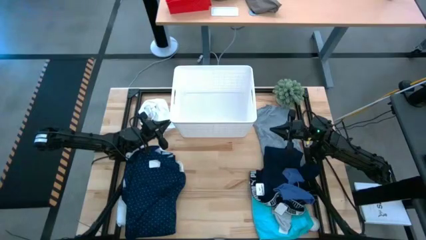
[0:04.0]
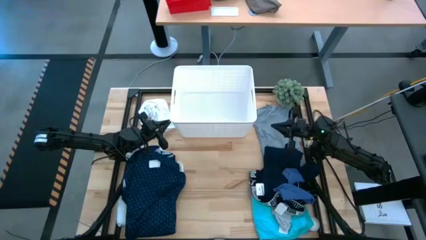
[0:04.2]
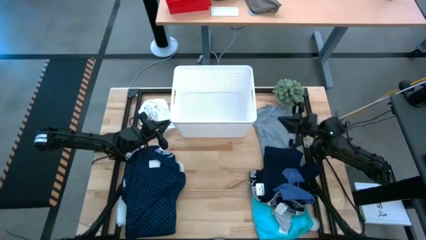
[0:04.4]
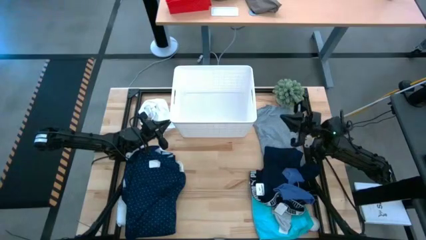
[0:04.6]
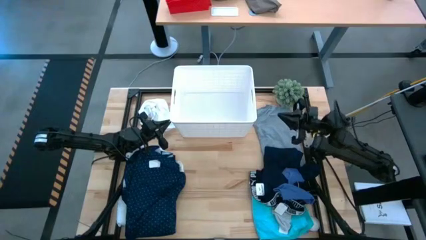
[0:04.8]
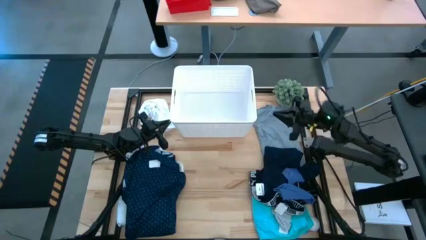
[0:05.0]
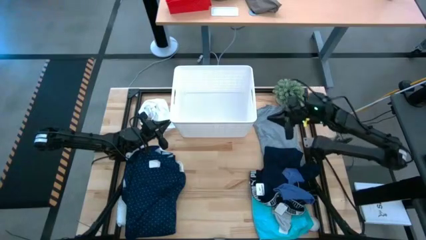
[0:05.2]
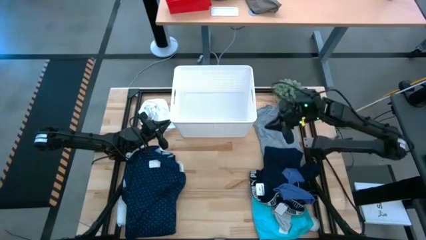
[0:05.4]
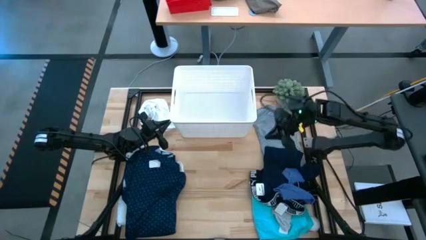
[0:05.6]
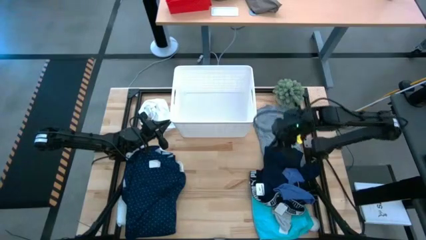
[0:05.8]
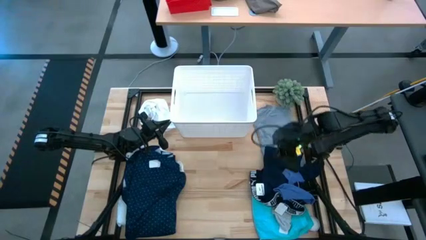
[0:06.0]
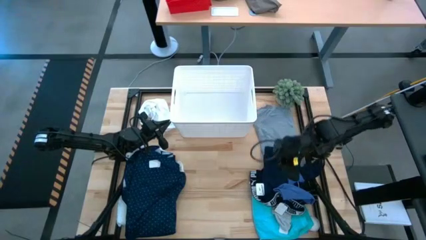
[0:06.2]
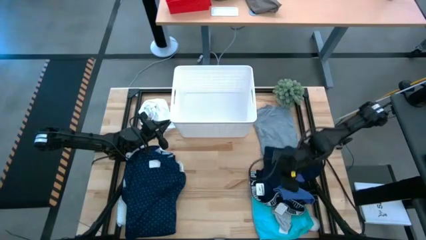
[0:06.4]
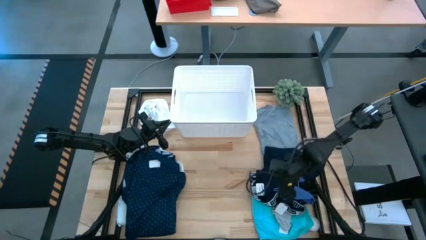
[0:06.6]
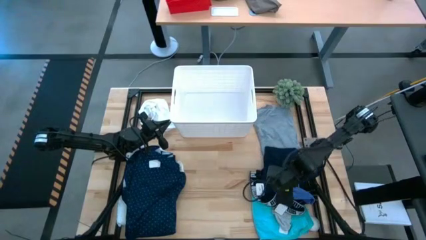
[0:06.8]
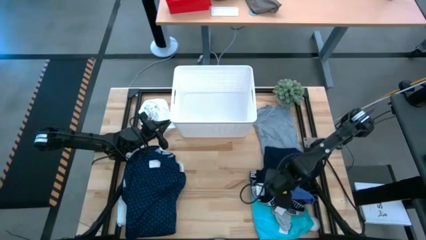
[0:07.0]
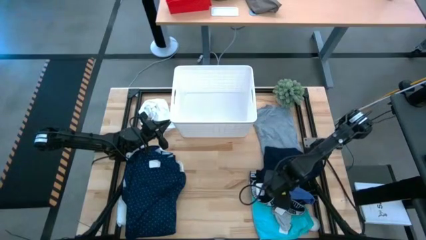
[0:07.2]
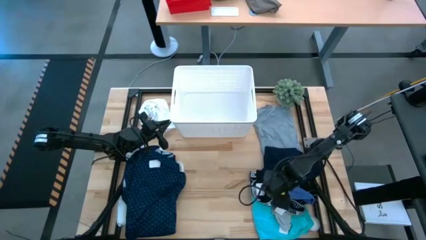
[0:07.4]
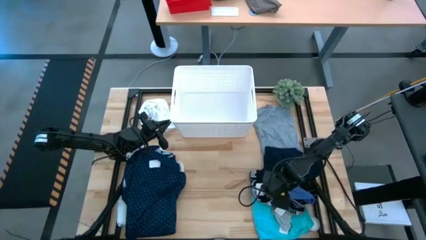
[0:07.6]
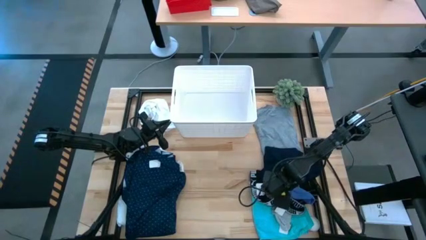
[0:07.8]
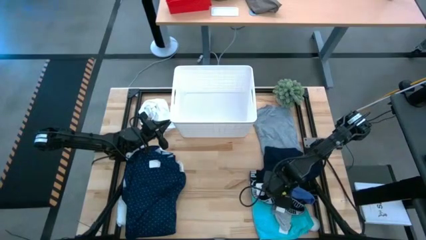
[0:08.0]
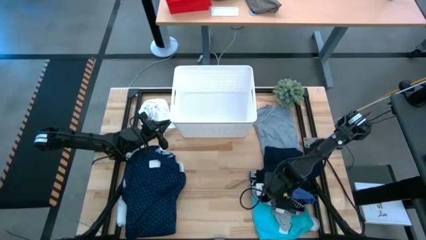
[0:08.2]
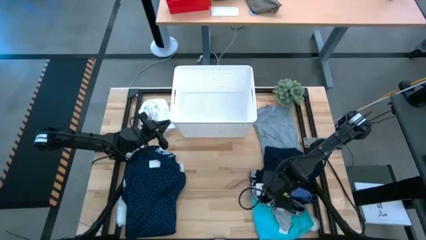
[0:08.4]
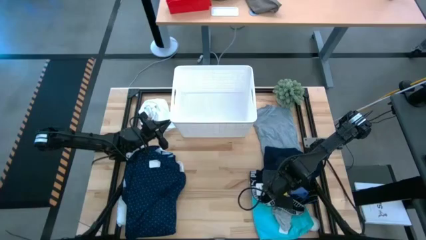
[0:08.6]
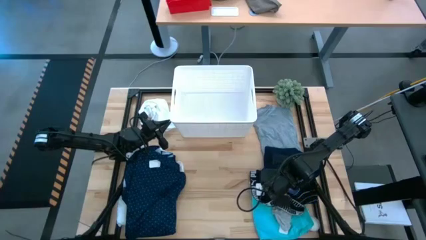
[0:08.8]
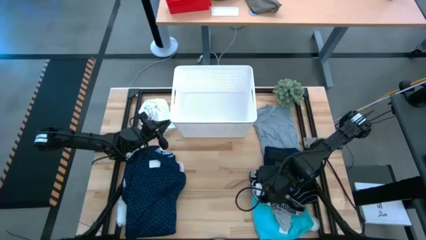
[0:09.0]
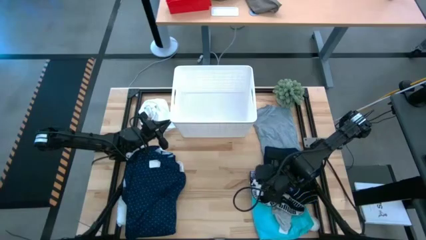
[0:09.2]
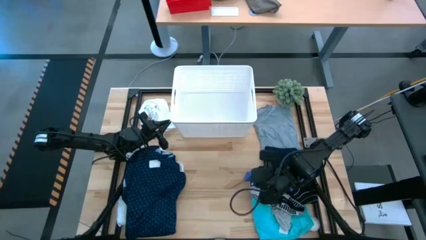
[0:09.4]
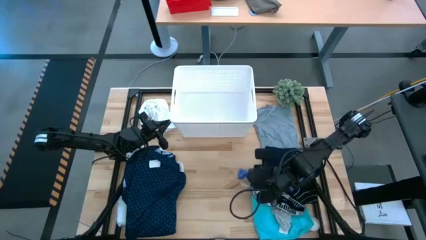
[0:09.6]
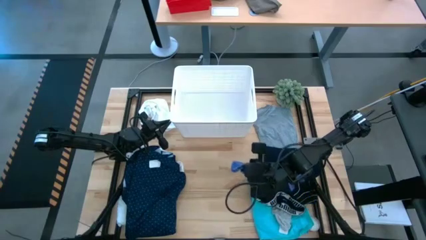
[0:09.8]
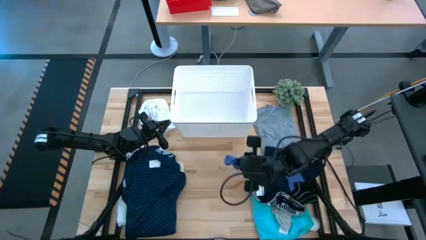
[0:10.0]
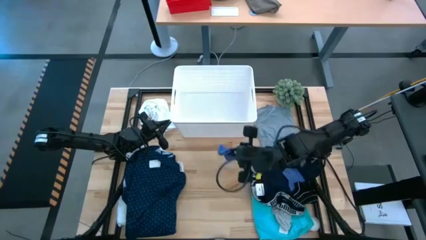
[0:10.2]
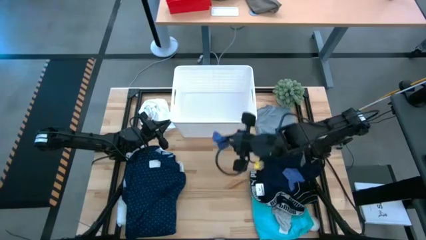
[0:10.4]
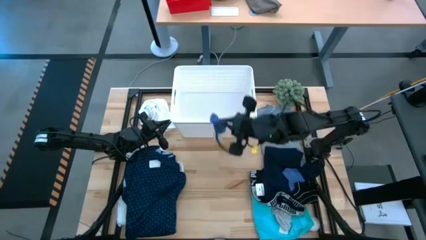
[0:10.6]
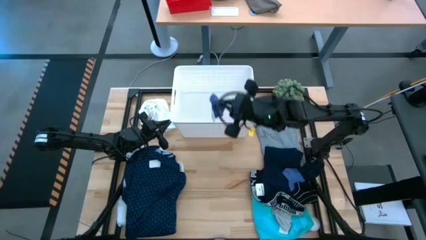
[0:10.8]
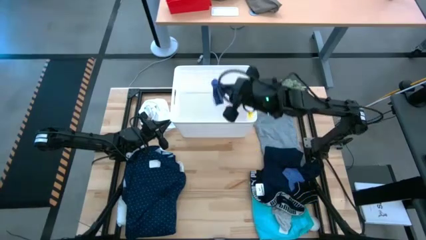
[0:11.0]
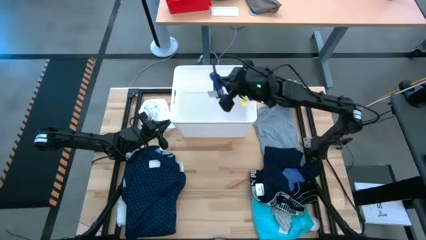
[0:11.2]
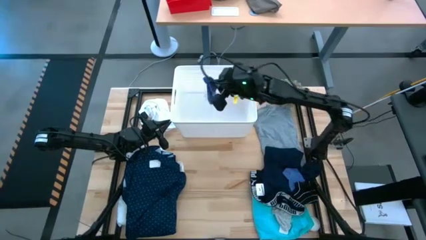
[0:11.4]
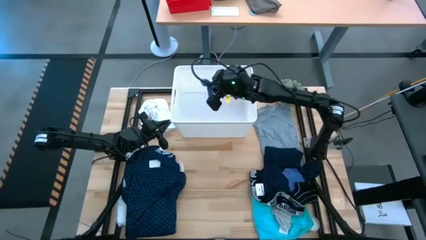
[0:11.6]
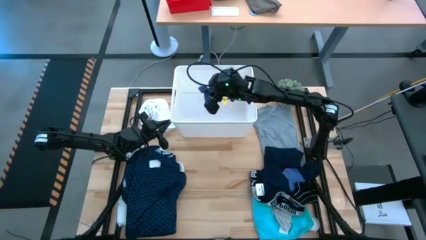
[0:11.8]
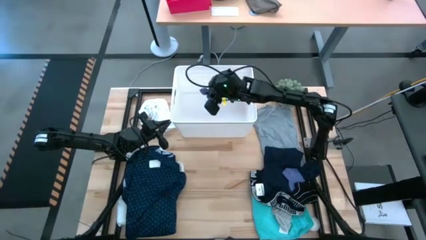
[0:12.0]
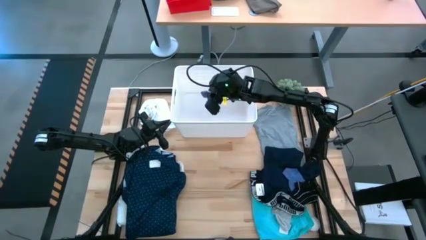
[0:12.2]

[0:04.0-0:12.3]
Task: Sort clothes
Put the purple sock into the white laundry bin

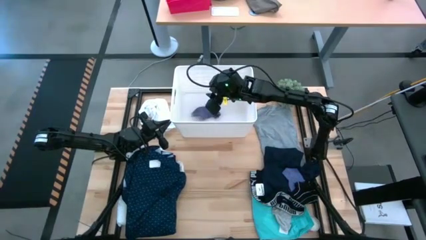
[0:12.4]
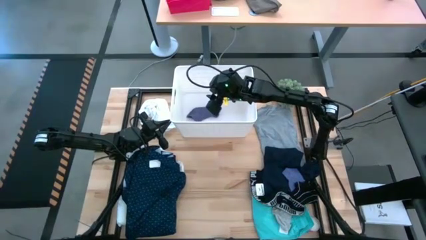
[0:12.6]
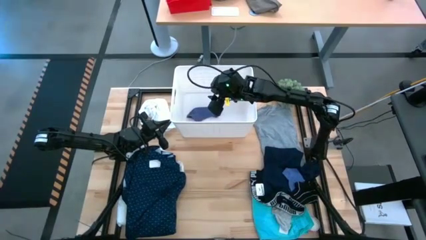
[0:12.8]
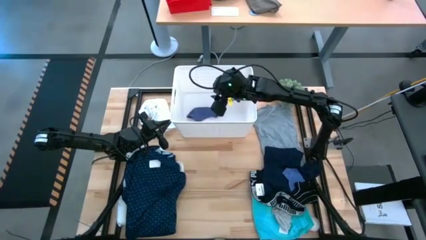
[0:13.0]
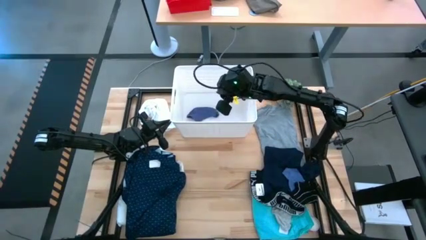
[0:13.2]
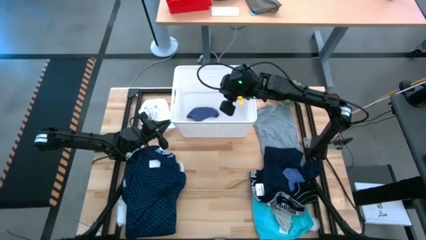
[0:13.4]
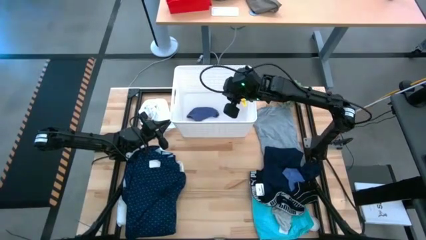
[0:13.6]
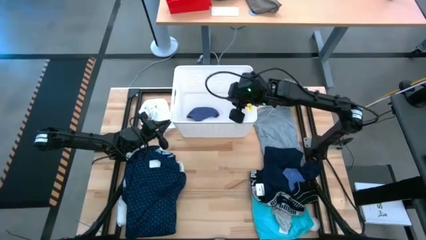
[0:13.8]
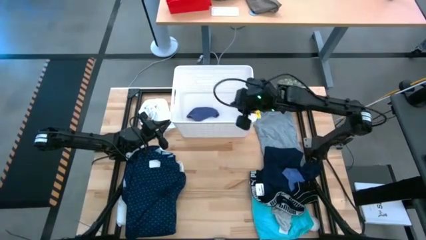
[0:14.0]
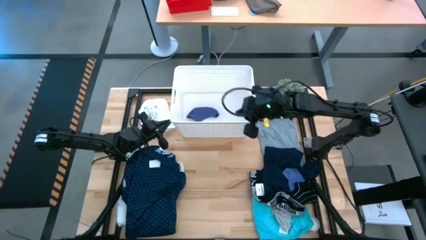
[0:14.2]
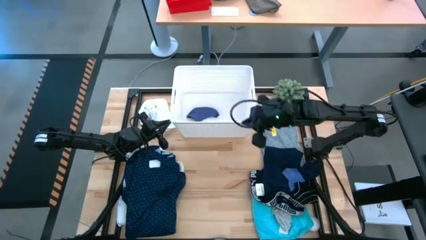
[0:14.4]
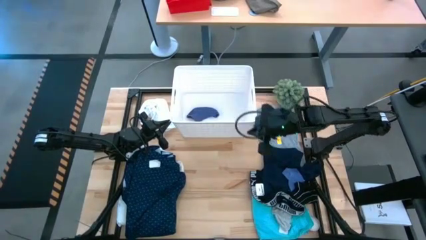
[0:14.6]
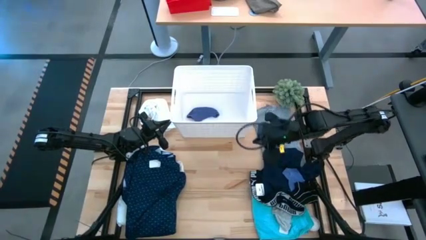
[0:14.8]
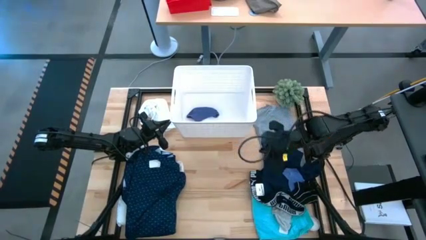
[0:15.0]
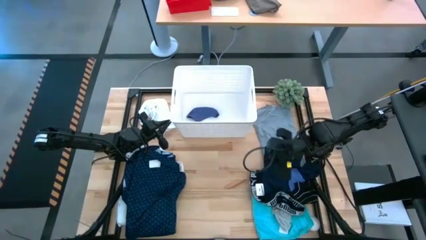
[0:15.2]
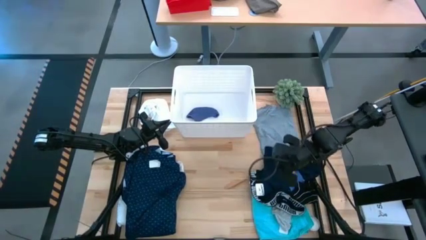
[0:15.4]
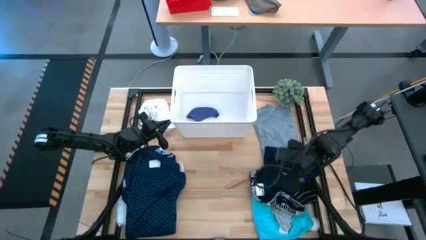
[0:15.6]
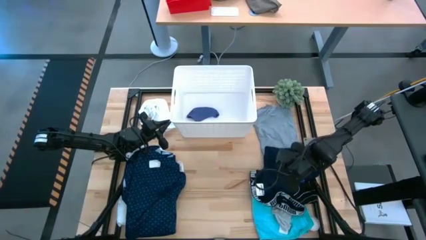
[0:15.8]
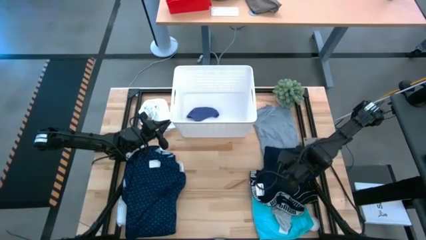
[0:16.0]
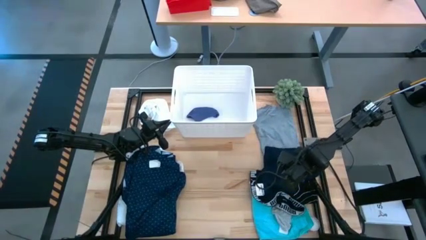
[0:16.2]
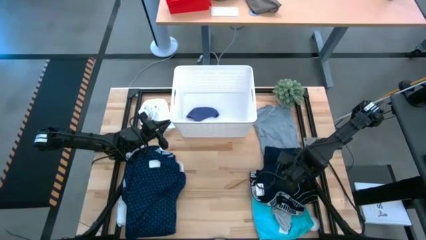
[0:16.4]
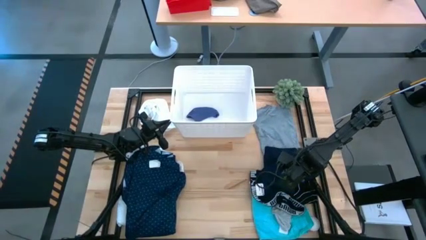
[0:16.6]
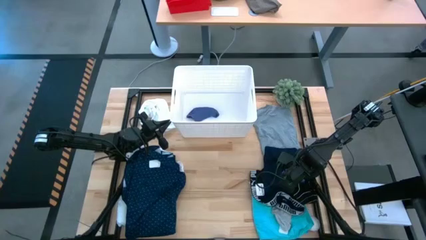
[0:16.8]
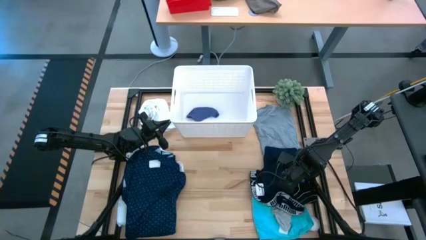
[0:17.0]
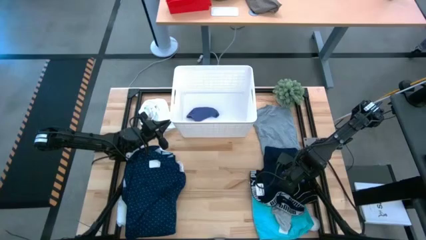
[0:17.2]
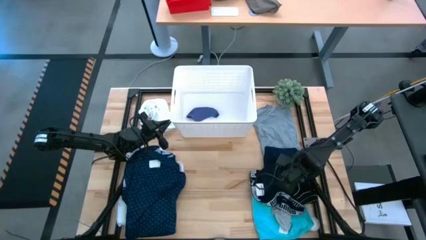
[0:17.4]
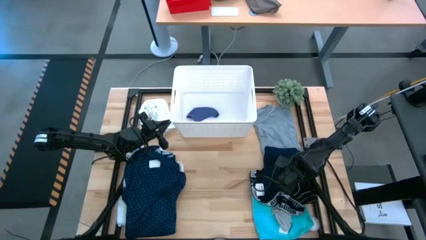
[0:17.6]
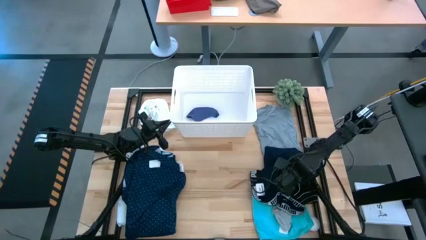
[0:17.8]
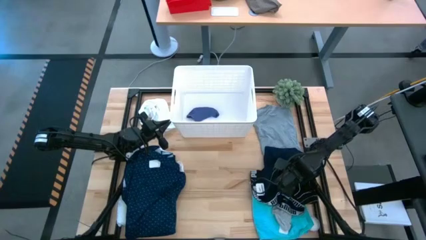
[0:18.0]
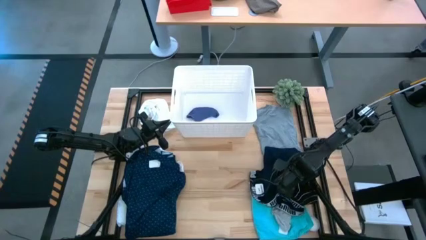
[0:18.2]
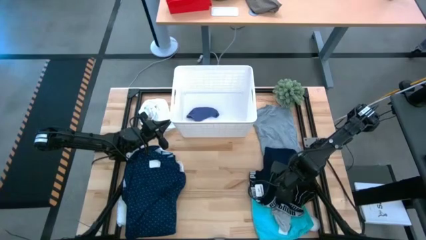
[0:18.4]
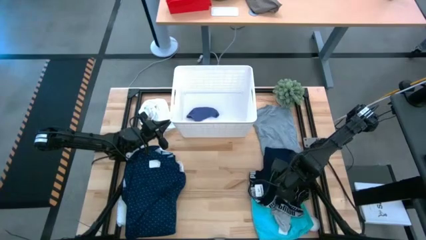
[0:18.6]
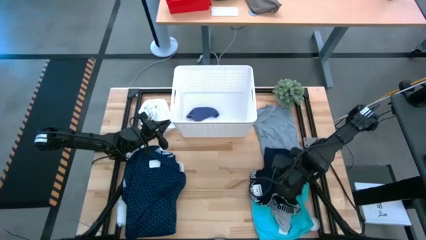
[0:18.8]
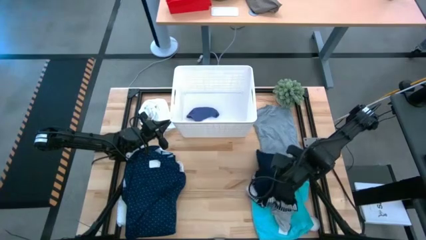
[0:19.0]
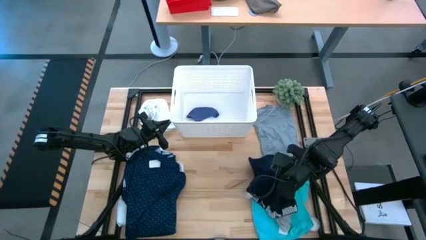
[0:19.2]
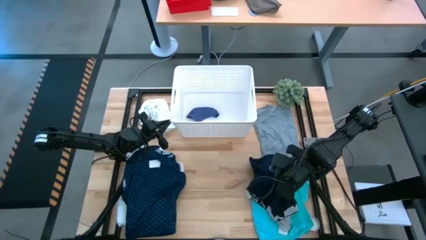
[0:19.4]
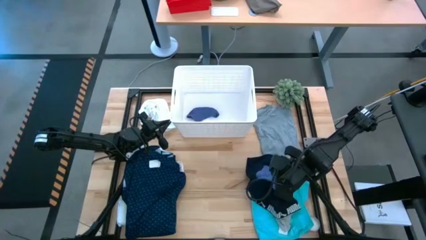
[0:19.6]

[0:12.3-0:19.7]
Put the purple sock into the white laundry bin

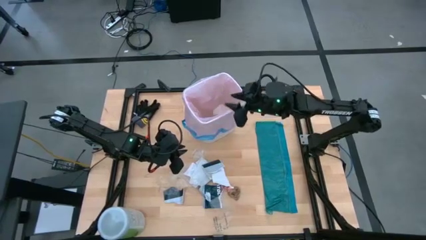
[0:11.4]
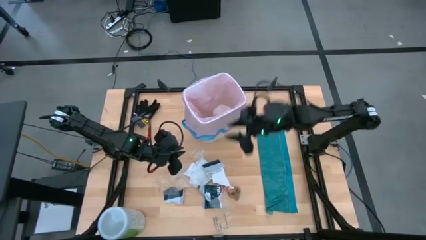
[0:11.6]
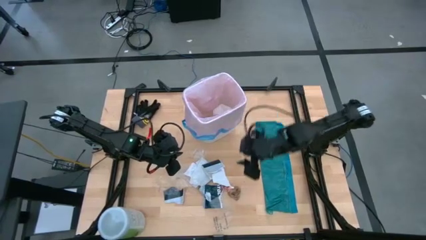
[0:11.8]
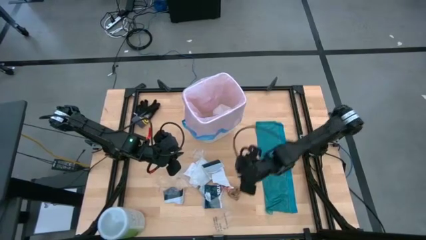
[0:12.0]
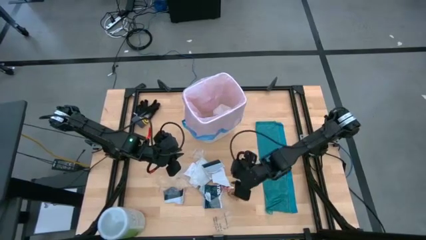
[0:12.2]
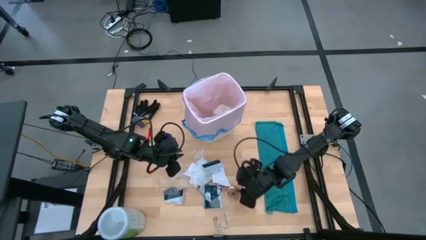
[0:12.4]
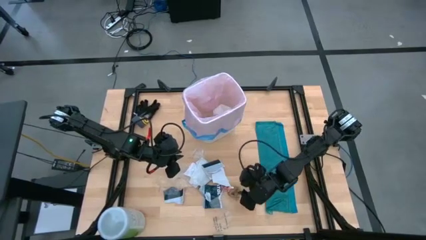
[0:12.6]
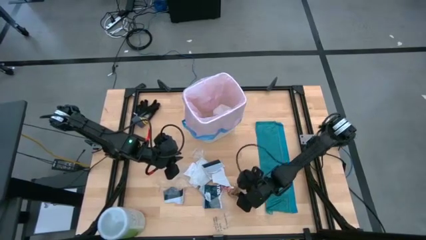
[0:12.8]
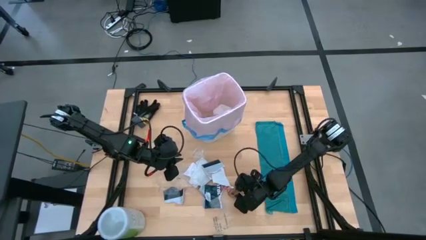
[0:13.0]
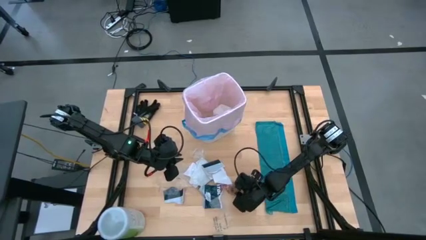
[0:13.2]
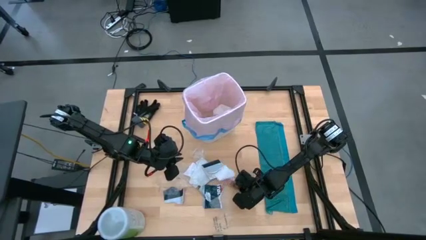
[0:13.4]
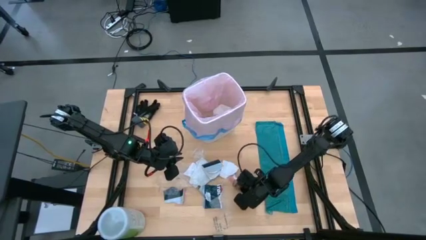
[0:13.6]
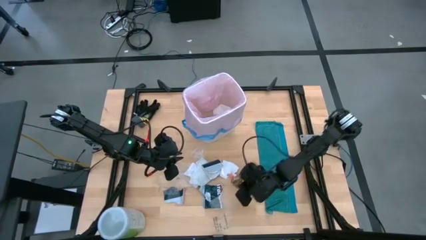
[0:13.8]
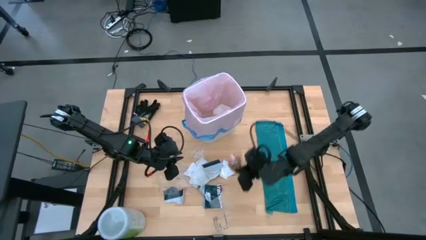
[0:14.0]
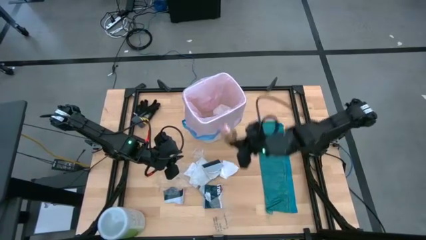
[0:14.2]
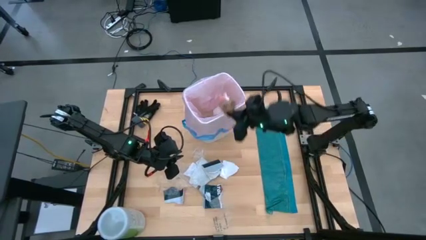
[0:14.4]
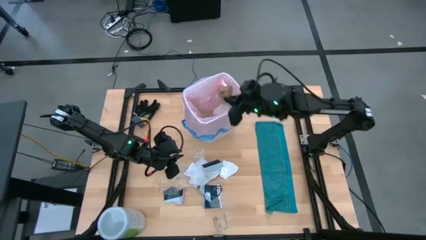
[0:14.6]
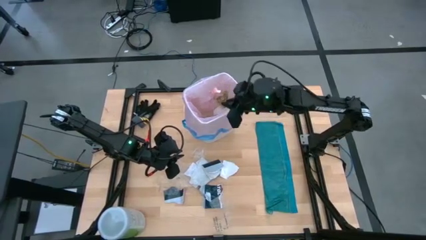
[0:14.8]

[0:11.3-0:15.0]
Task: place trash/remove bag and relplace
Put the brown paper into the white trash bin
